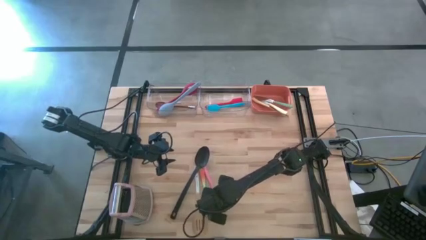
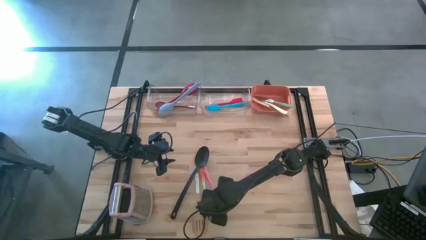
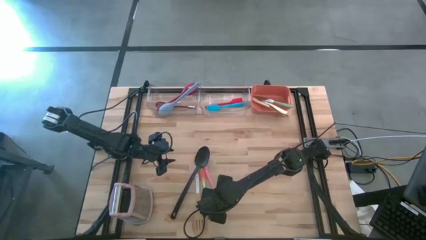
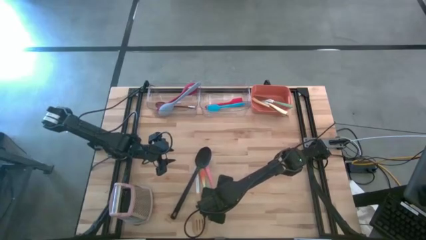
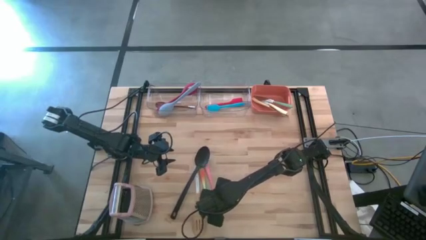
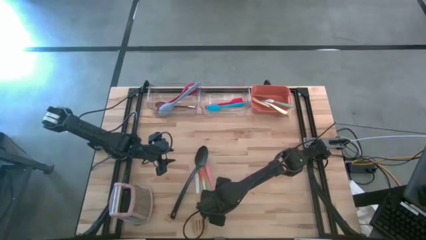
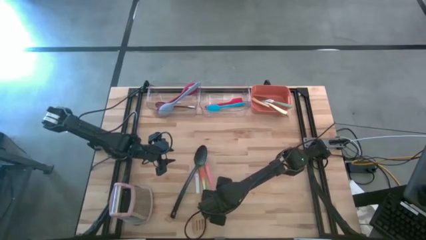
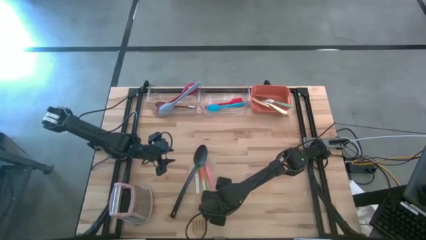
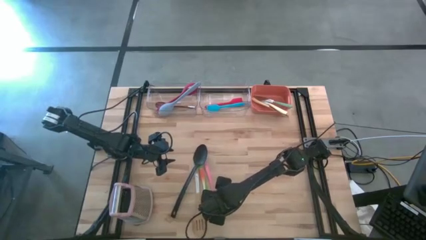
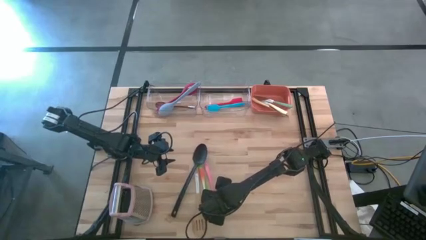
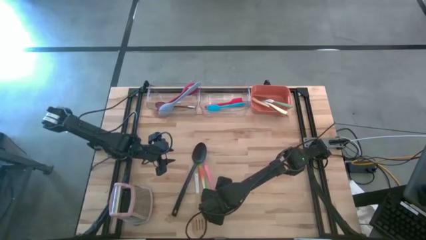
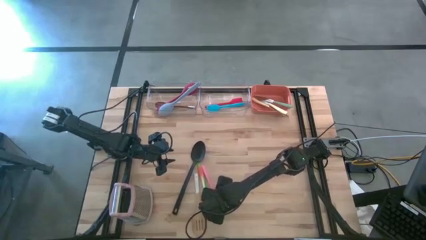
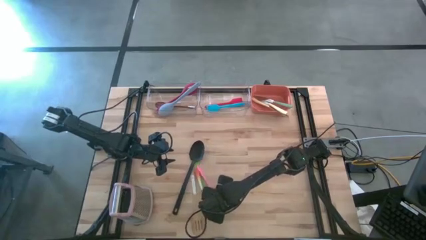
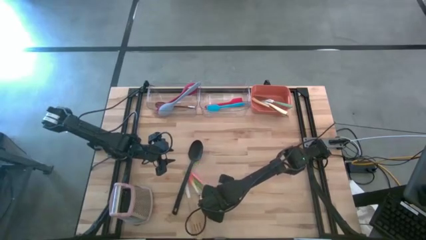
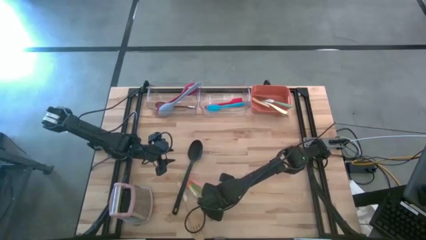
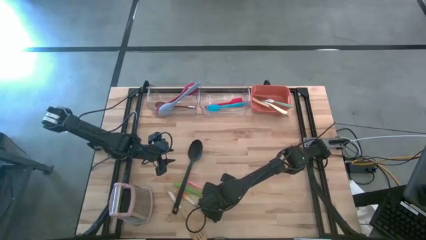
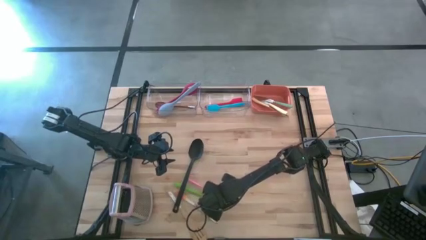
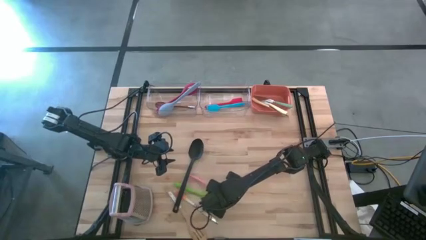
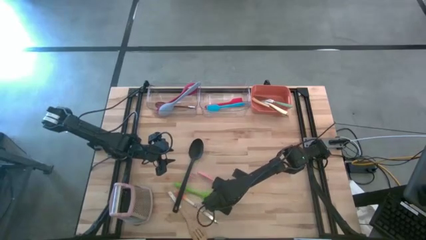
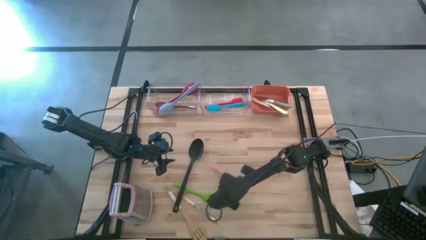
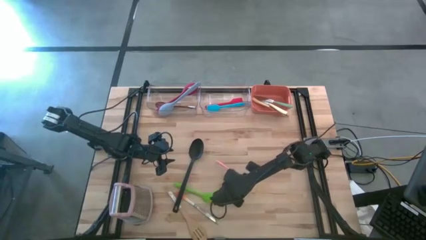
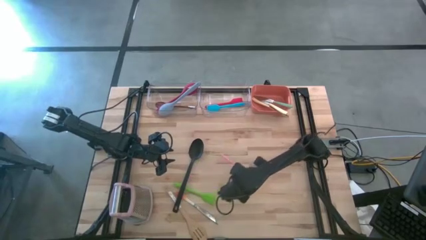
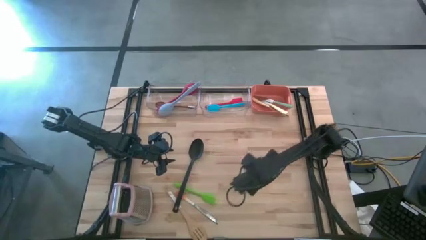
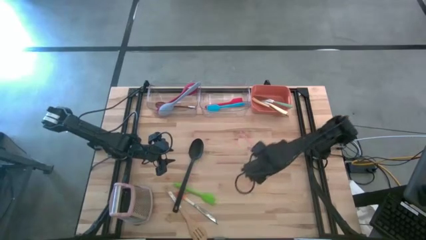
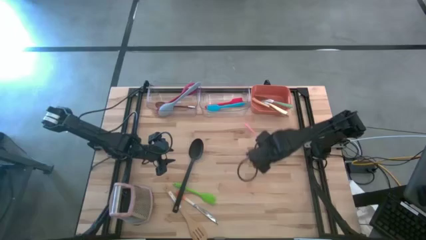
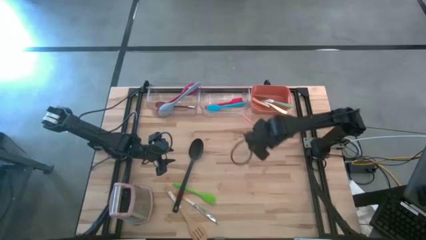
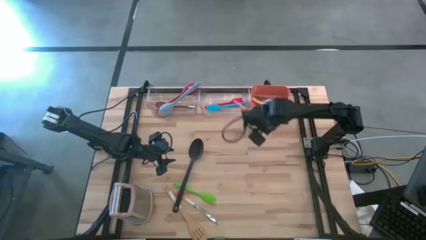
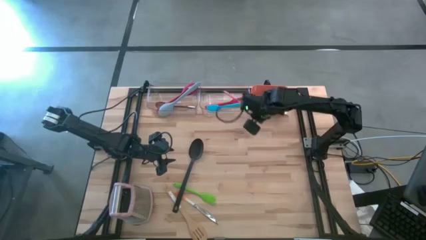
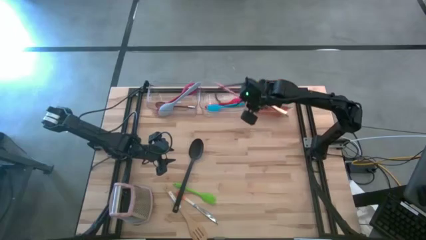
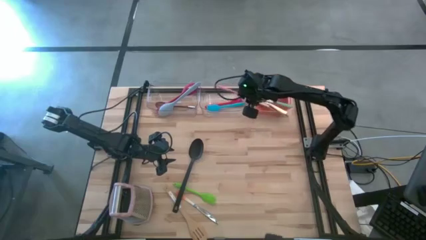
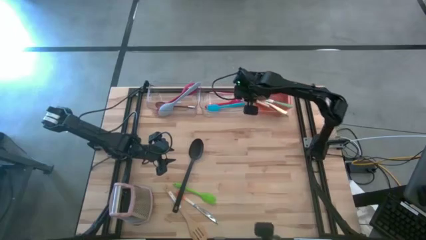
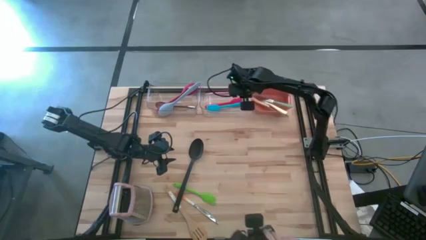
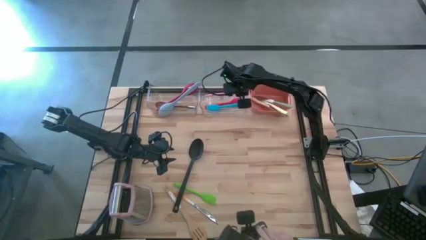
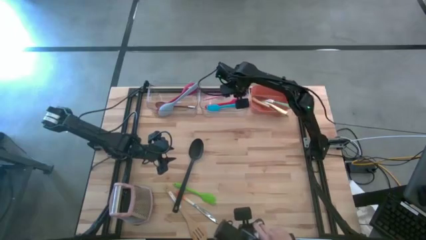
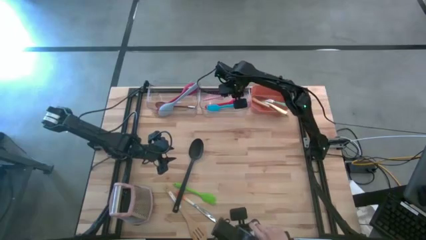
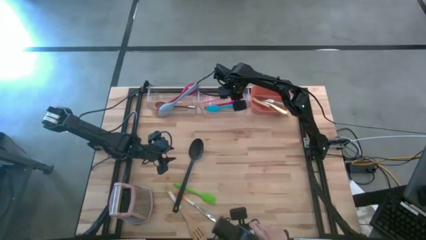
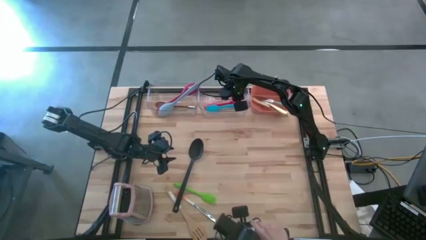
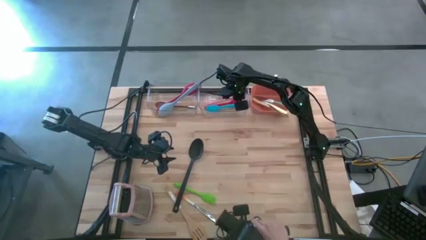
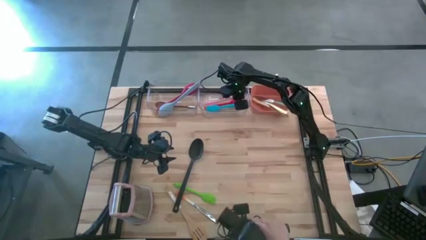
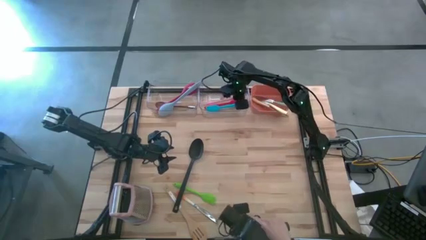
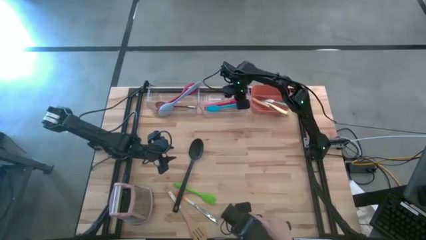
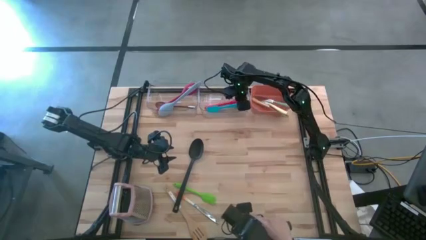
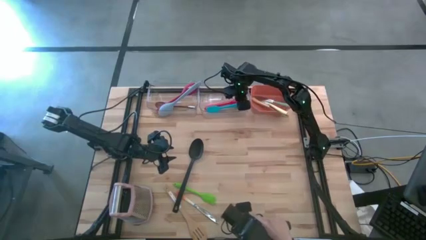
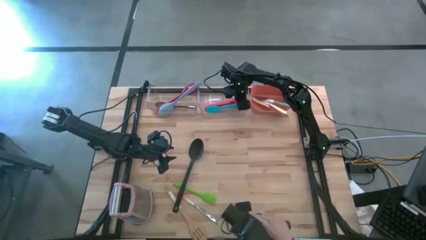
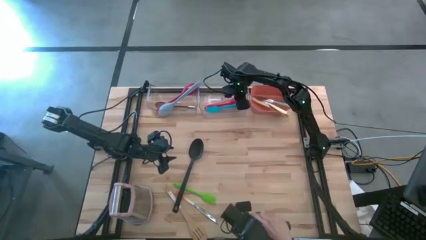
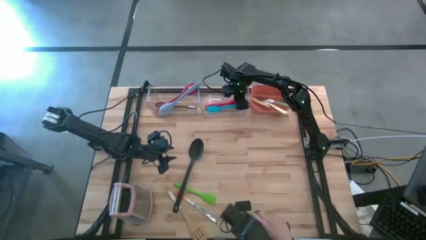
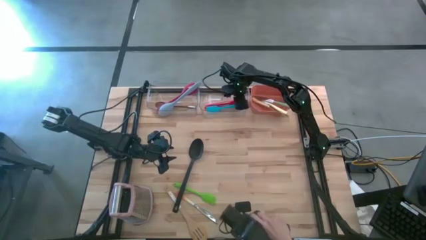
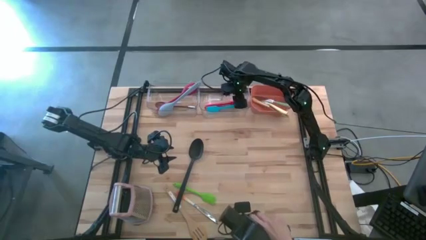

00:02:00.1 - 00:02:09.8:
Task: Pick & Place Kitchen Items
Put the pink spatula into the right transparent bin
